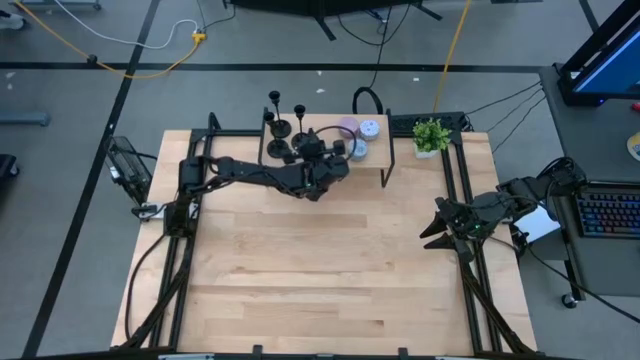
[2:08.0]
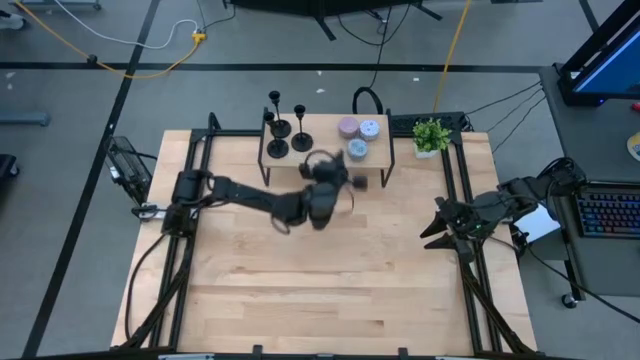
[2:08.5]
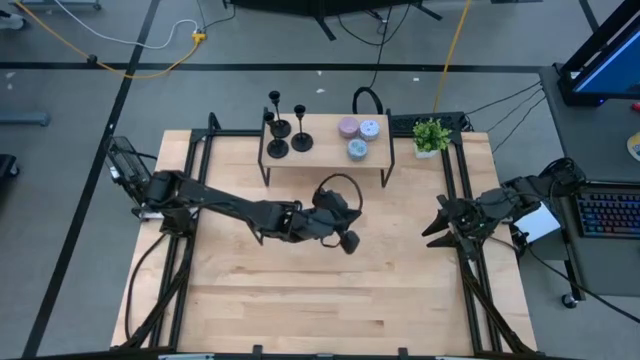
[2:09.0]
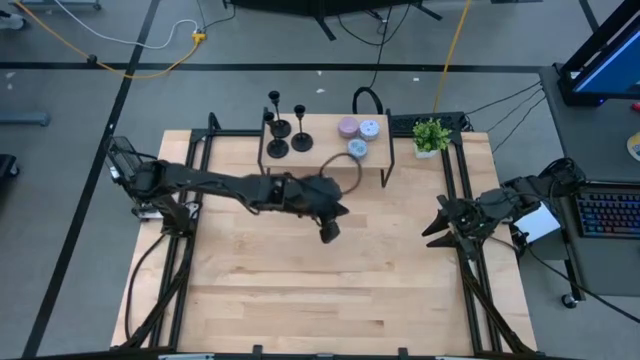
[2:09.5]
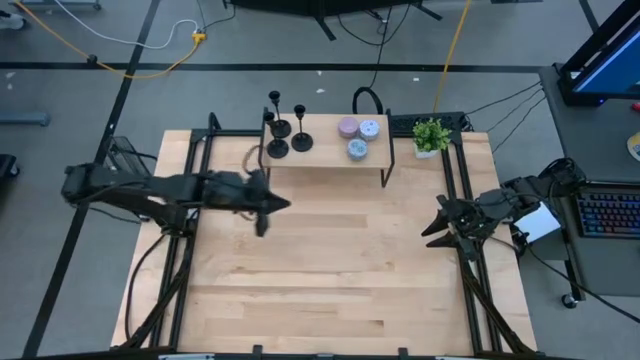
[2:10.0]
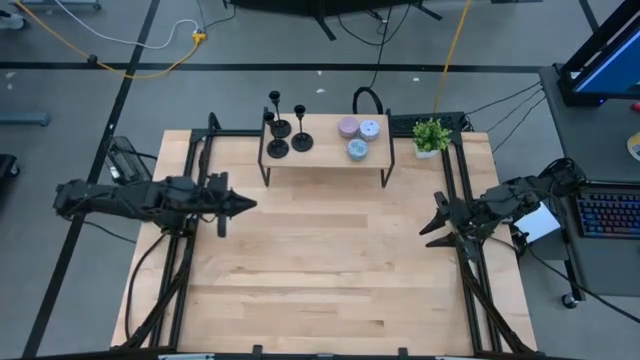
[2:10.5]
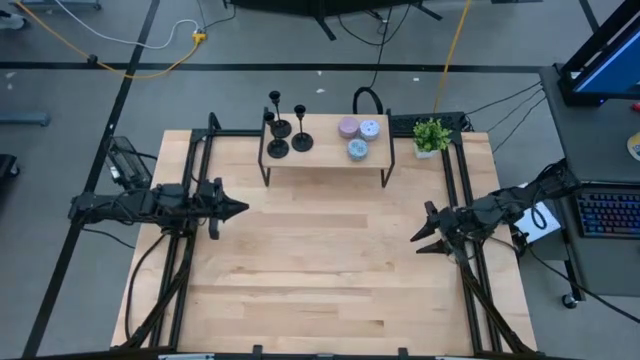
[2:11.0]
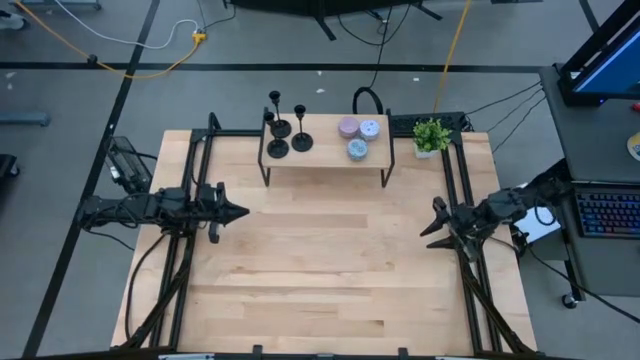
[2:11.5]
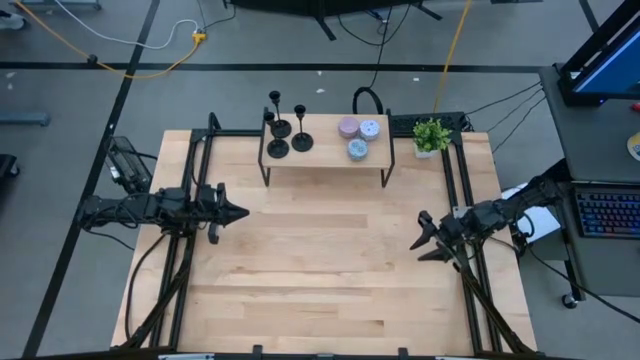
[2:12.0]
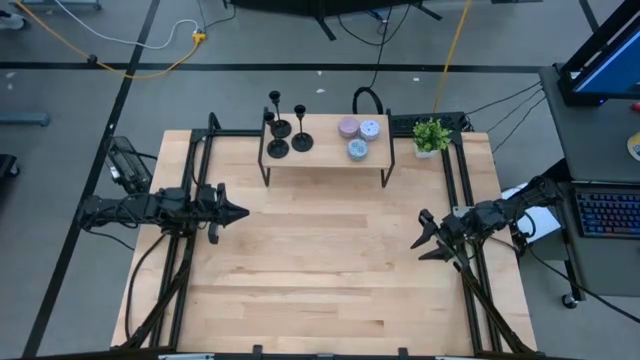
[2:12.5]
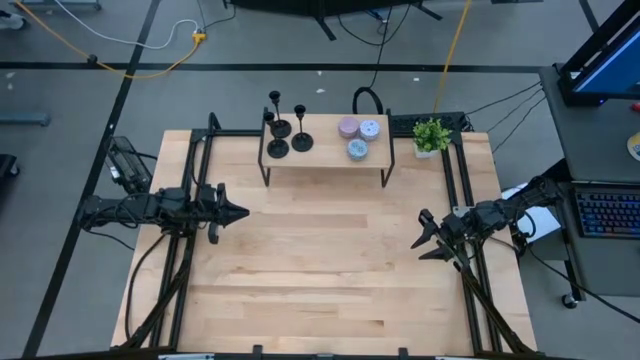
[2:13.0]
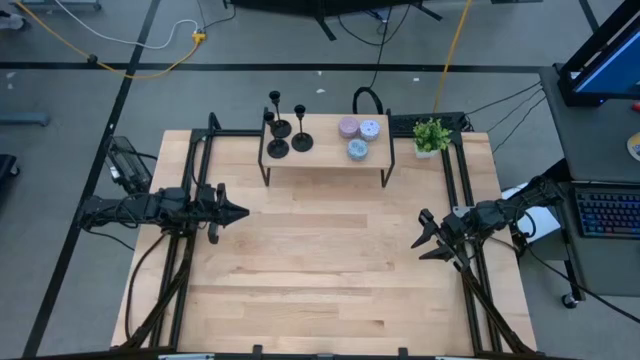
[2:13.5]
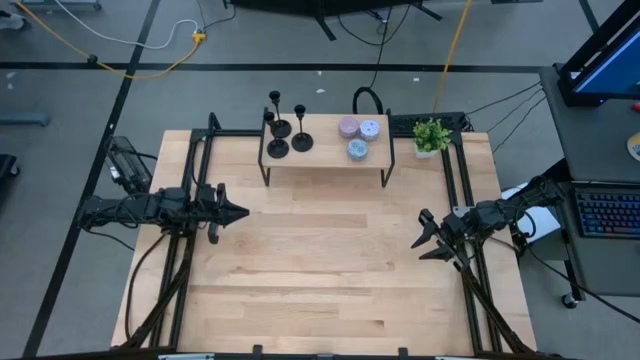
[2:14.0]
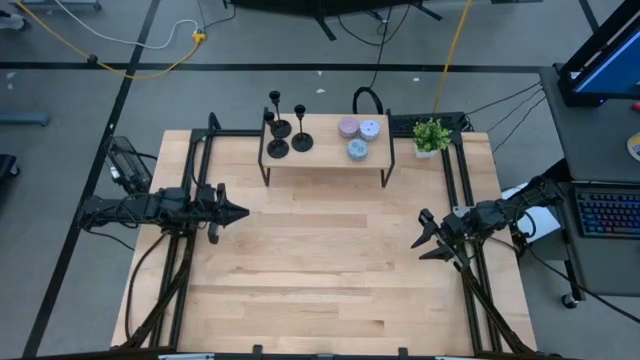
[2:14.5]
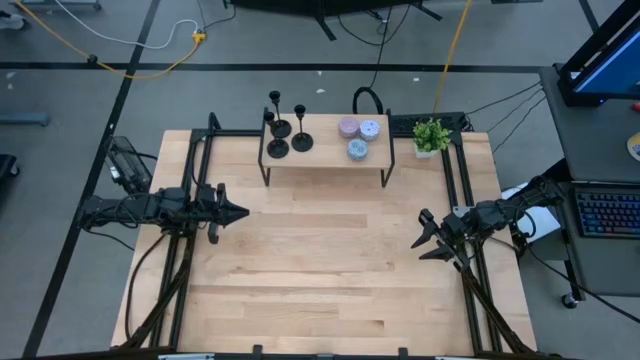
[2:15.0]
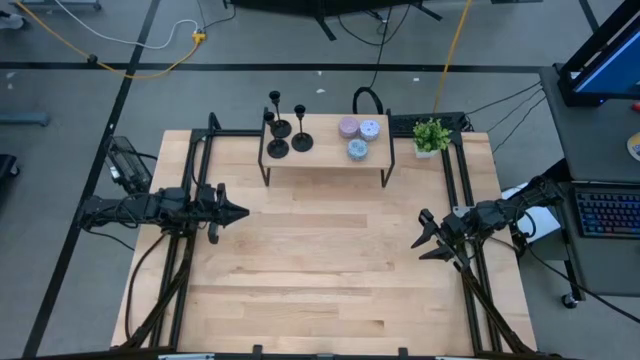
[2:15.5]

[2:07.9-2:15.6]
Task: Pick & Place candle stick holders
Return to Home Position

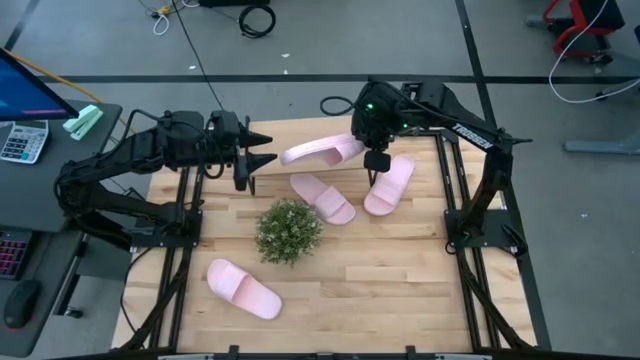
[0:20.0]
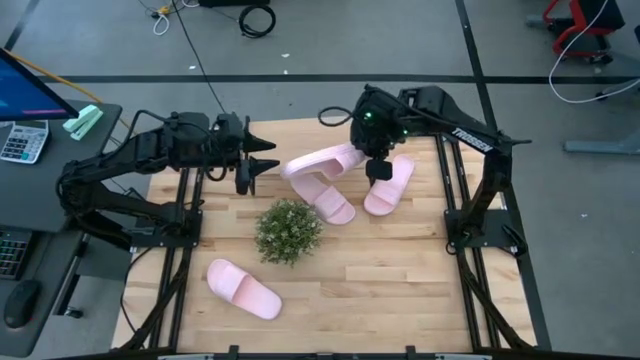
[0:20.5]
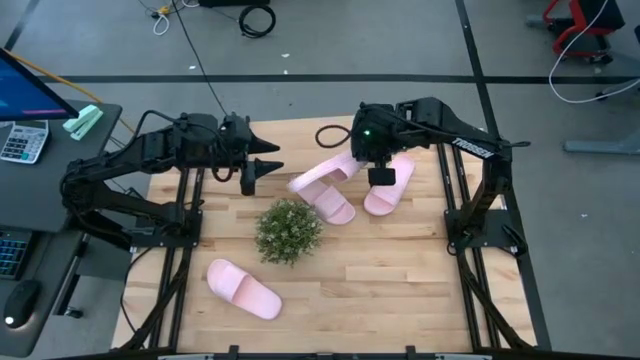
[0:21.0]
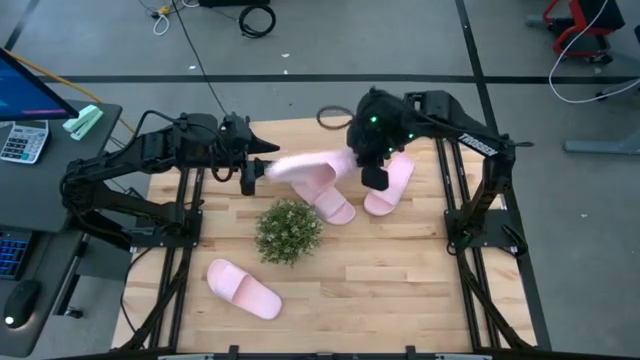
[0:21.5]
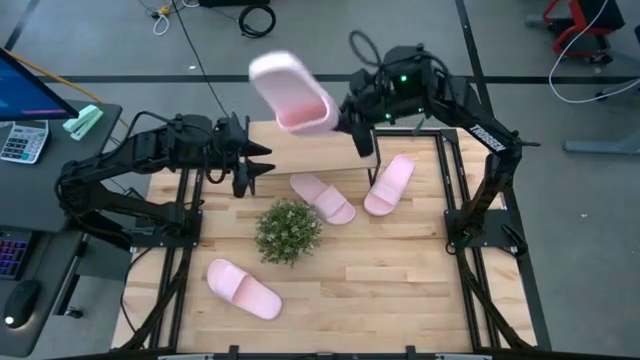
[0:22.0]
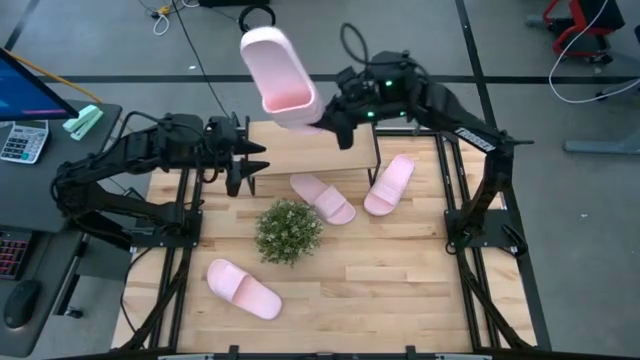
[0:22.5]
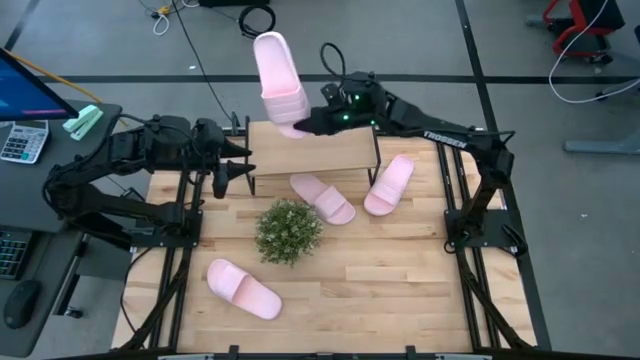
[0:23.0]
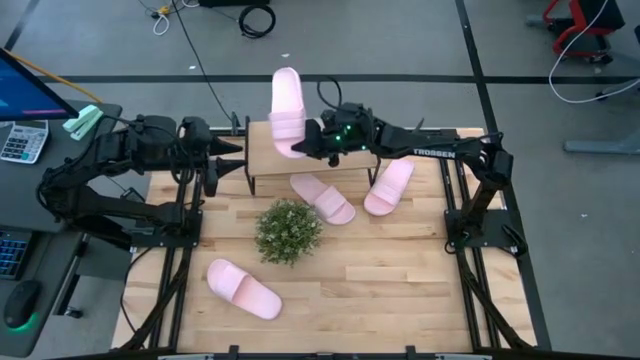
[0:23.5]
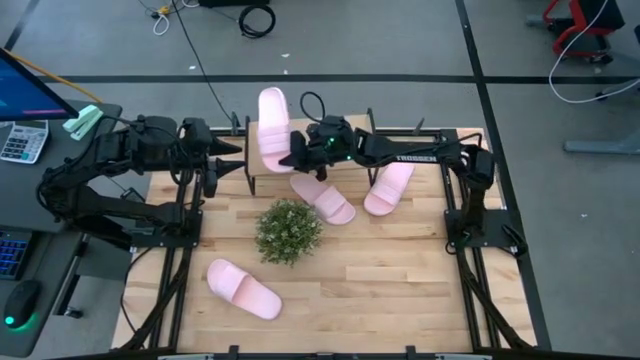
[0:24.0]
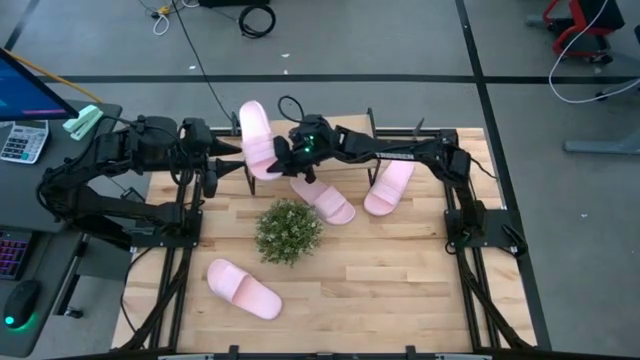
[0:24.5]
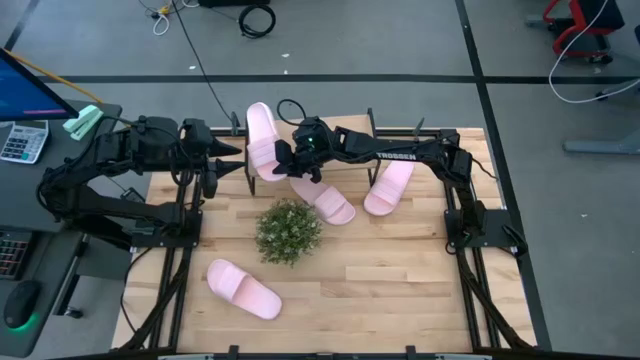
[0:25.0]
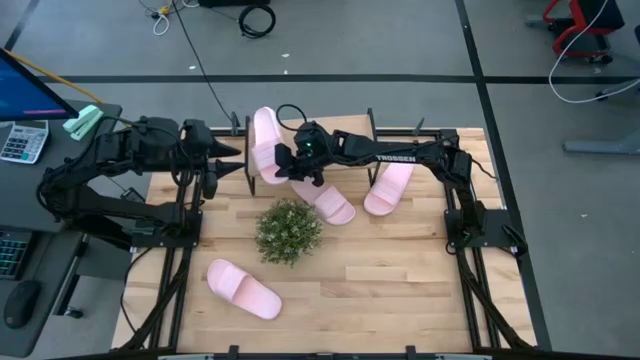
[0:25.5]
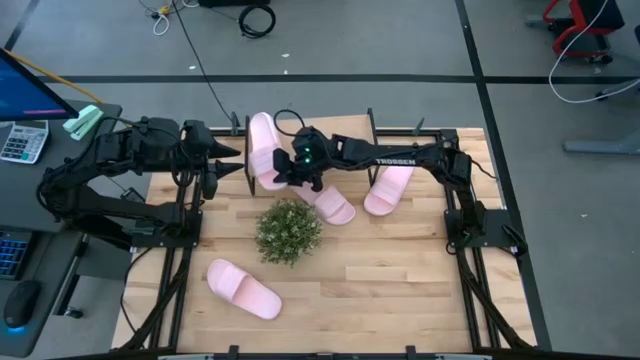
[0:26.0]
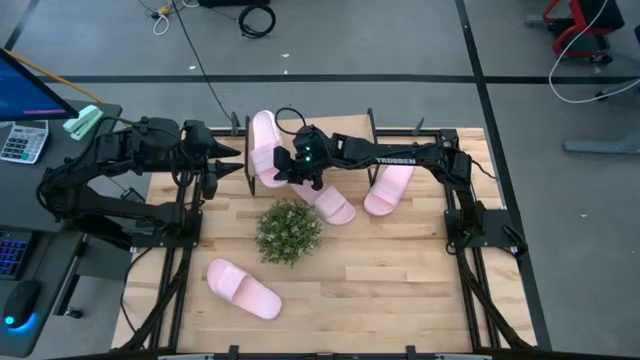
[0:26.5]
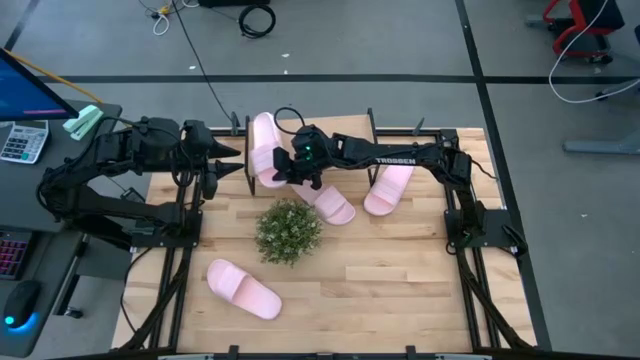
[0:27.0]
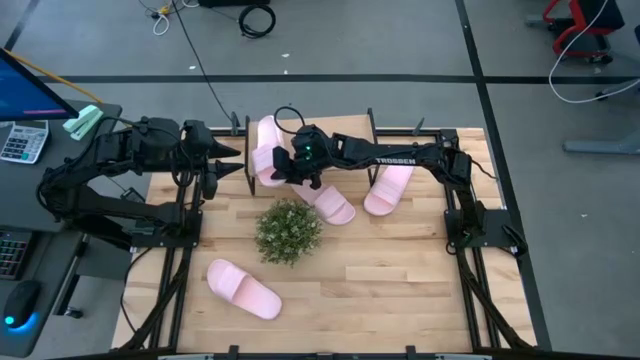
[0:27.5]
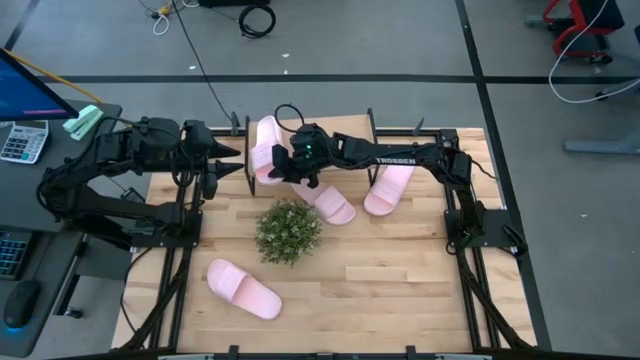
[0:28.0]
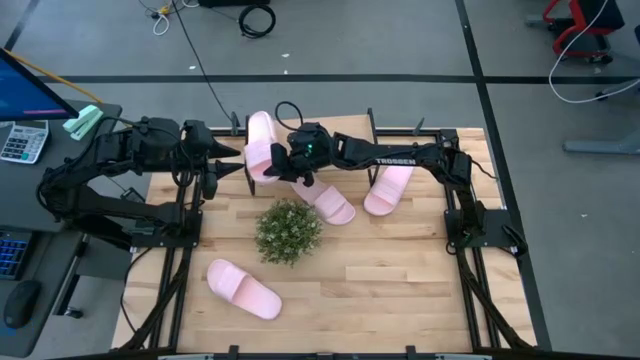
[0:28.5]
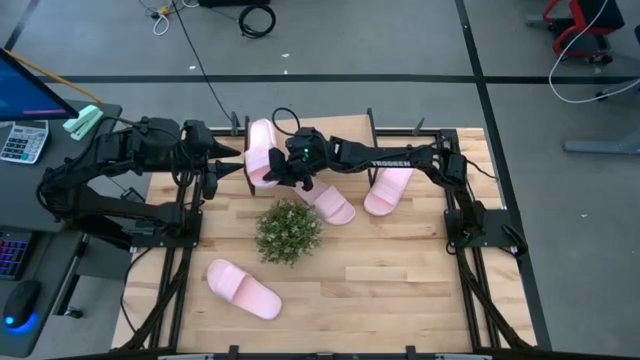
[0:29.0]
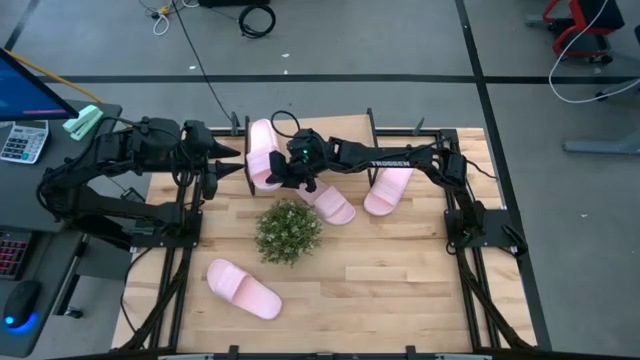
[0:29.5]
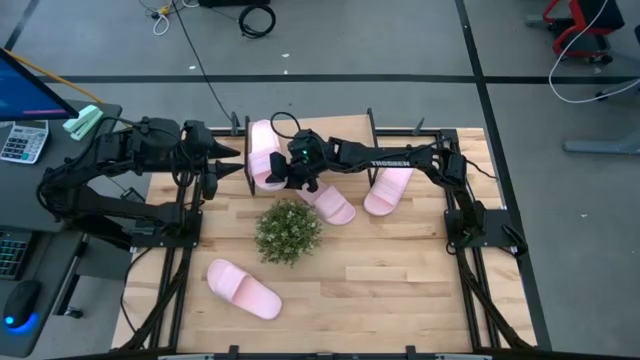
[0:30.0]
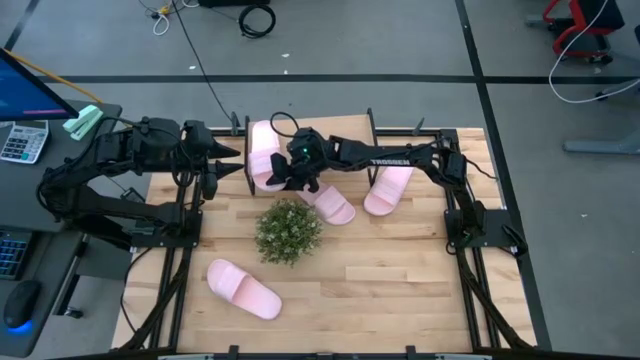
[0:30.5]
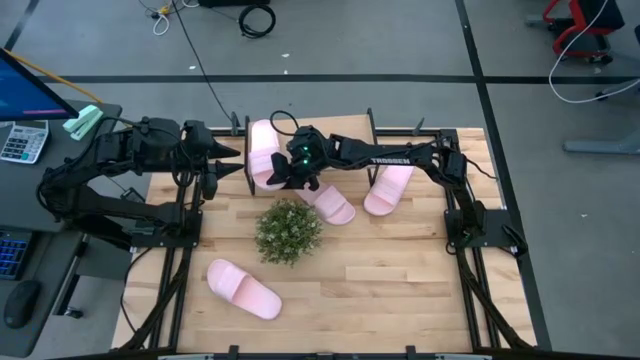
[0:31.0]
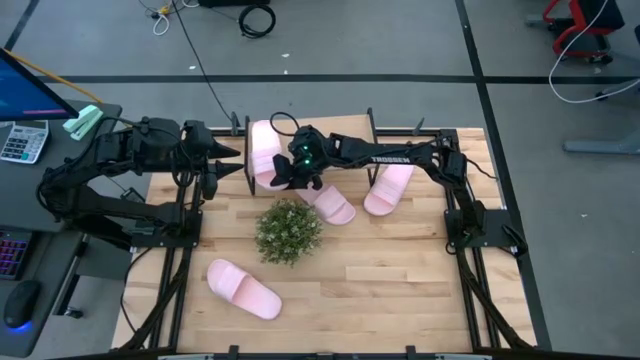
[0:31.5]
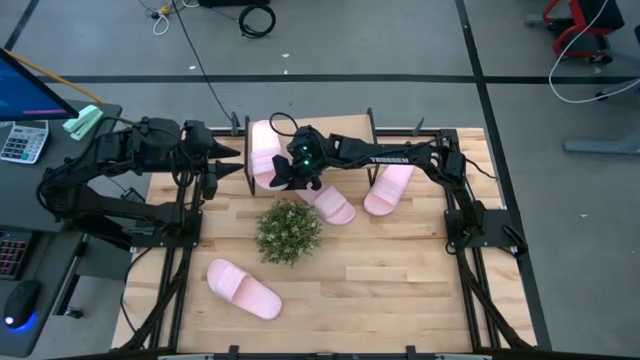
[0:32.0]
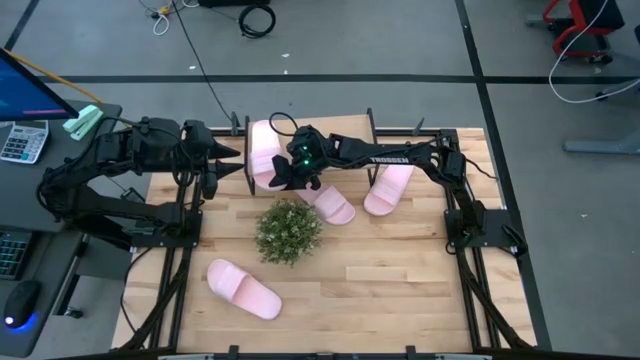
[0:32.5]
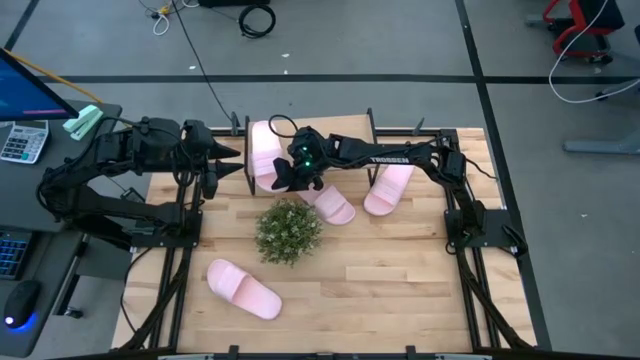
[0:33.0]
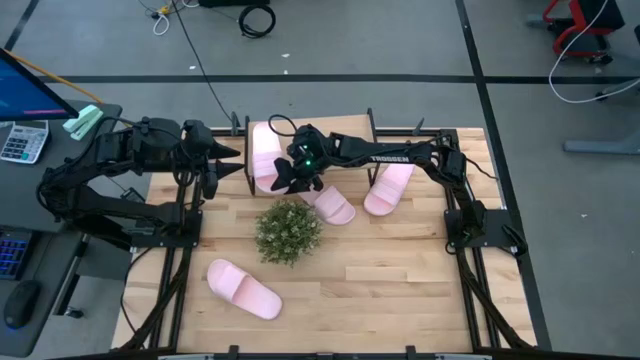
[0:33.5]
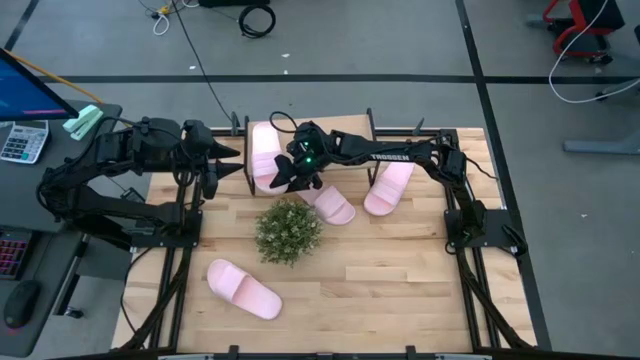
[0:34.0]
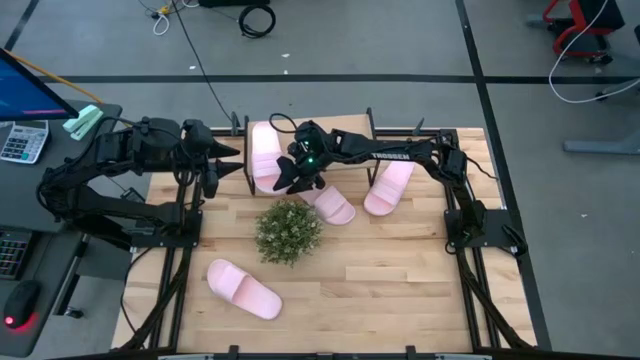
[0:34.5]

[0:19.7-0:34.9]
Task: Pick and place slides into the shelf
Put the pink slide on the shelf
